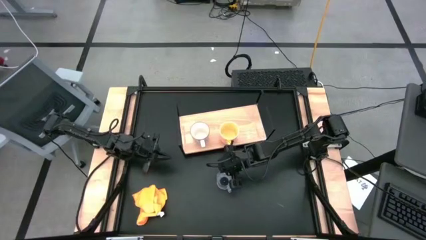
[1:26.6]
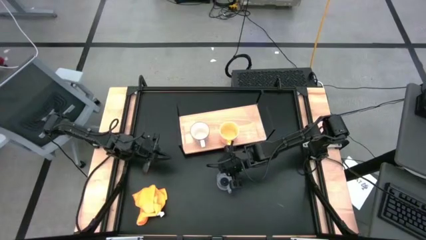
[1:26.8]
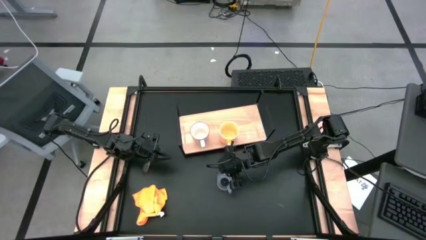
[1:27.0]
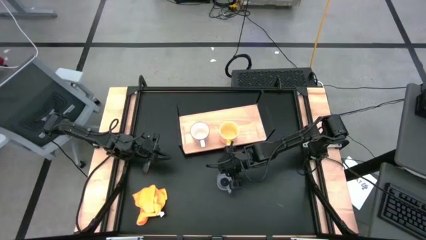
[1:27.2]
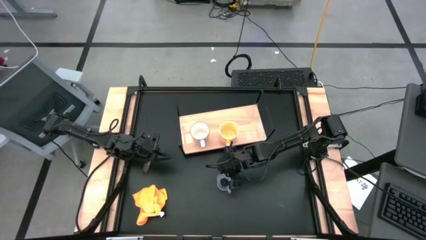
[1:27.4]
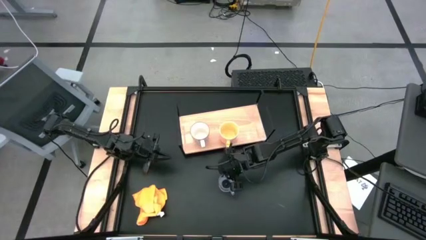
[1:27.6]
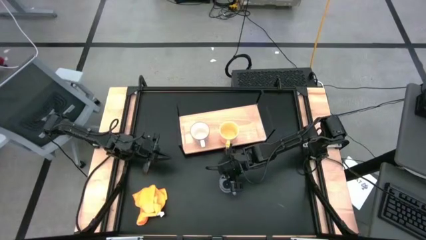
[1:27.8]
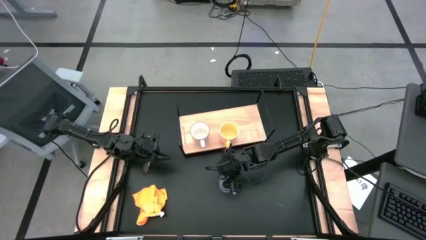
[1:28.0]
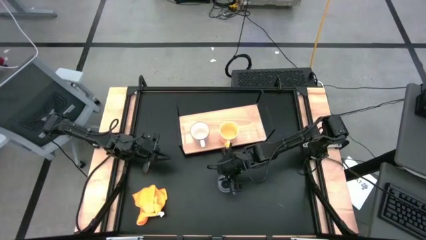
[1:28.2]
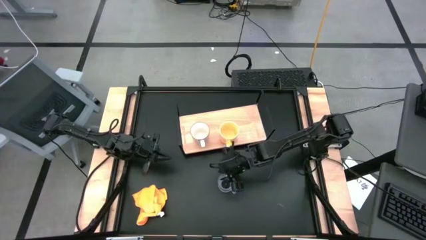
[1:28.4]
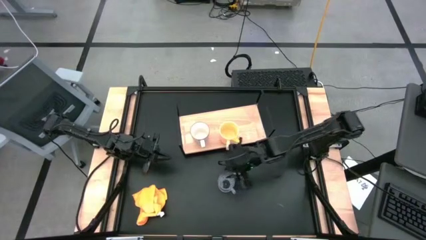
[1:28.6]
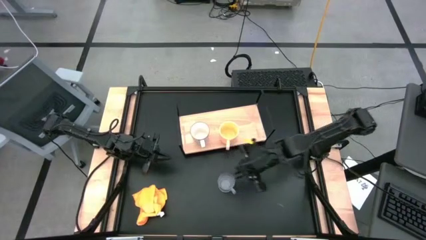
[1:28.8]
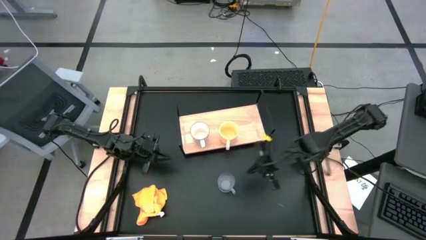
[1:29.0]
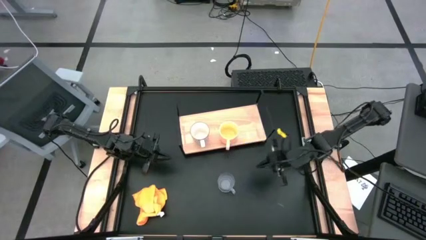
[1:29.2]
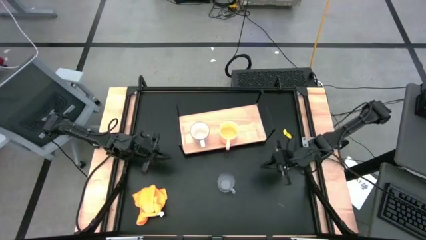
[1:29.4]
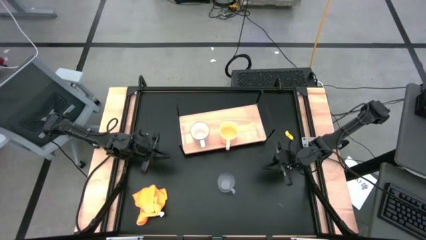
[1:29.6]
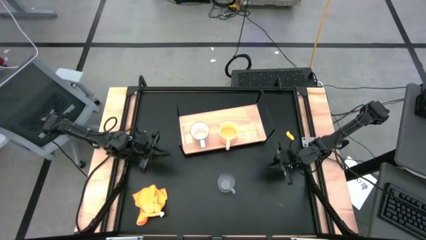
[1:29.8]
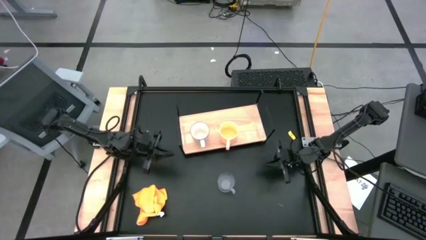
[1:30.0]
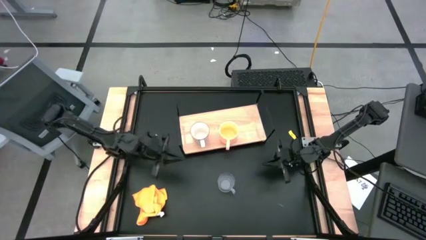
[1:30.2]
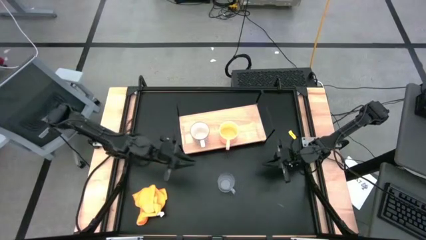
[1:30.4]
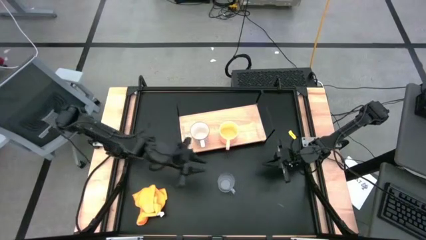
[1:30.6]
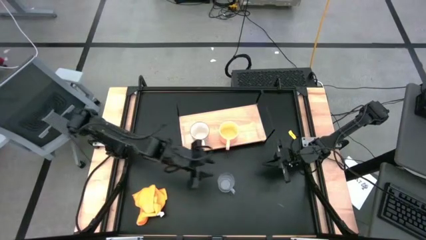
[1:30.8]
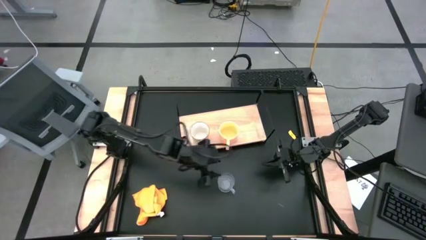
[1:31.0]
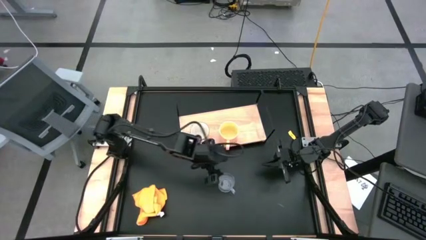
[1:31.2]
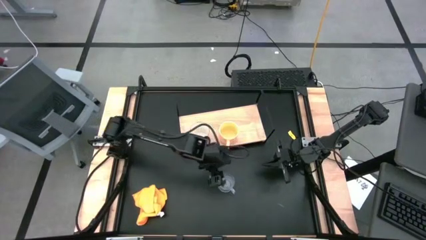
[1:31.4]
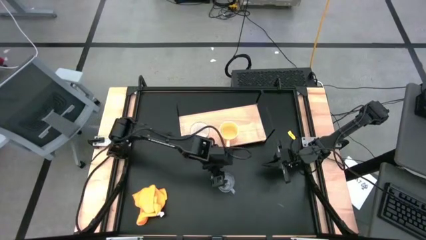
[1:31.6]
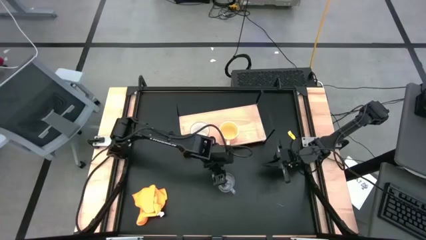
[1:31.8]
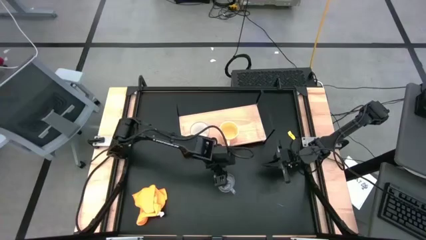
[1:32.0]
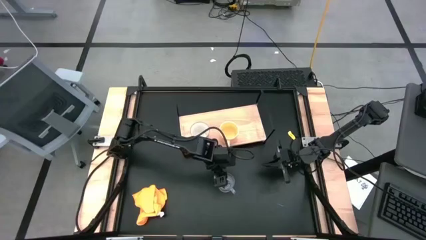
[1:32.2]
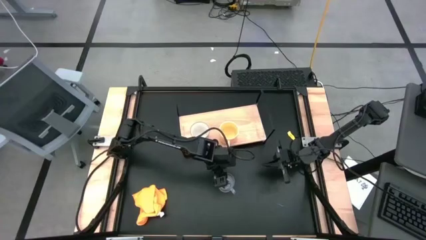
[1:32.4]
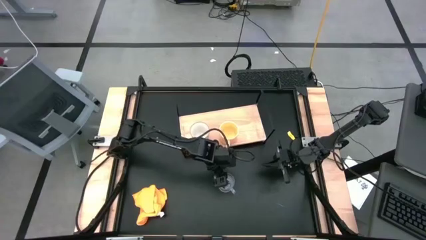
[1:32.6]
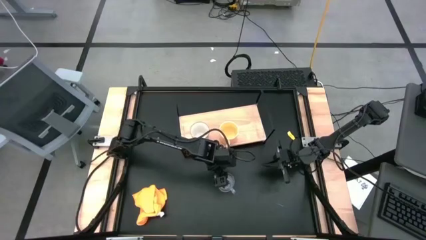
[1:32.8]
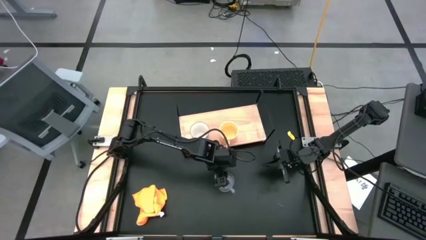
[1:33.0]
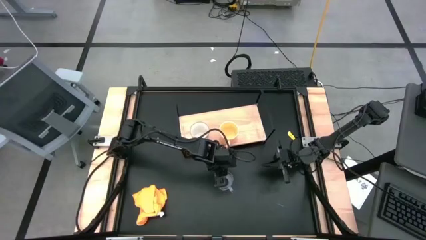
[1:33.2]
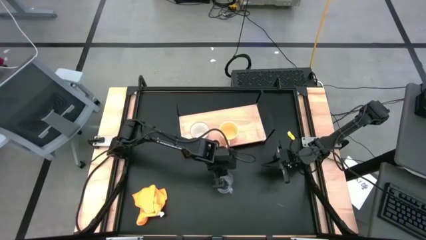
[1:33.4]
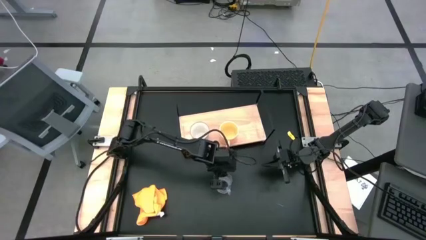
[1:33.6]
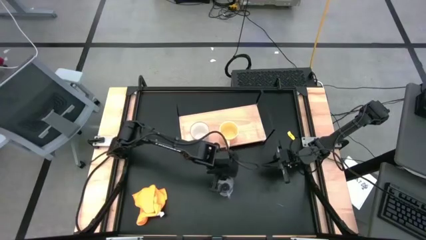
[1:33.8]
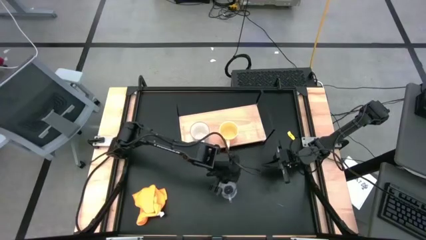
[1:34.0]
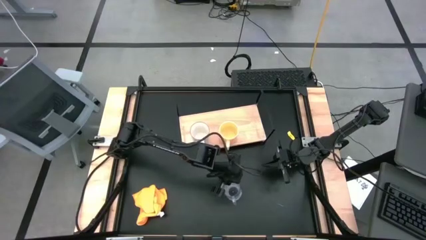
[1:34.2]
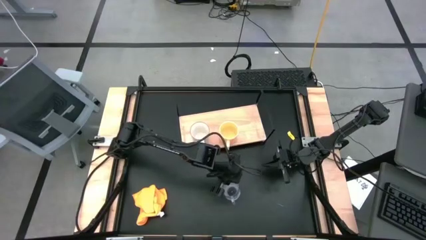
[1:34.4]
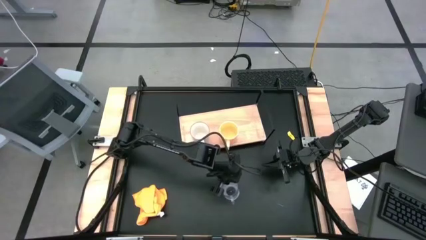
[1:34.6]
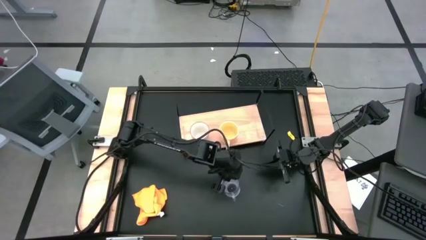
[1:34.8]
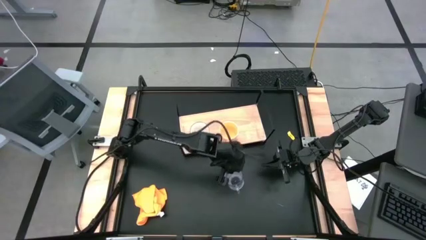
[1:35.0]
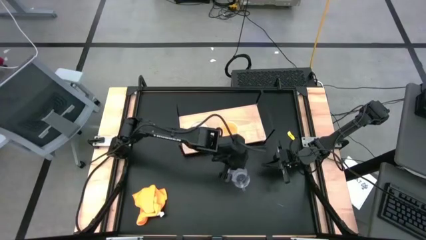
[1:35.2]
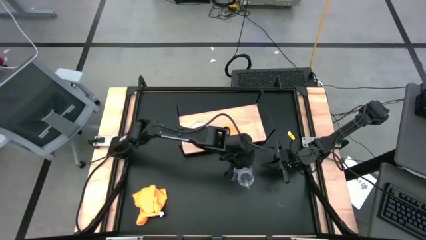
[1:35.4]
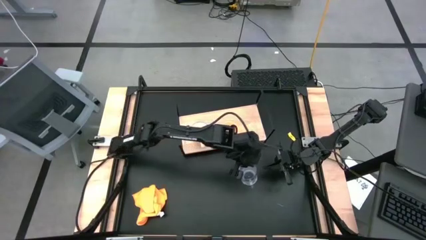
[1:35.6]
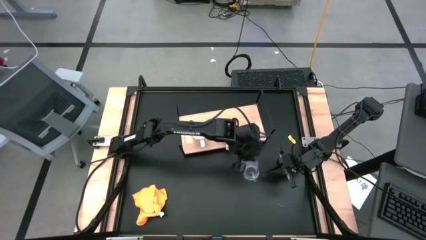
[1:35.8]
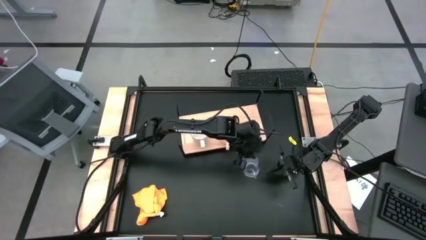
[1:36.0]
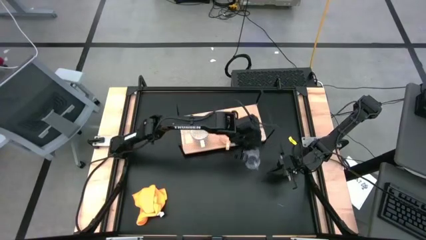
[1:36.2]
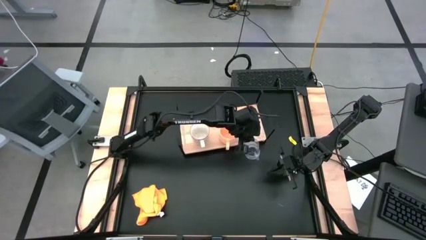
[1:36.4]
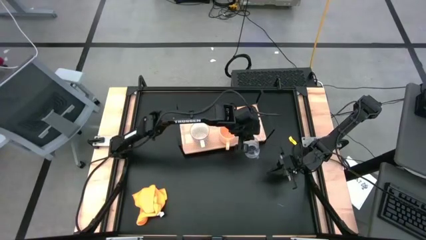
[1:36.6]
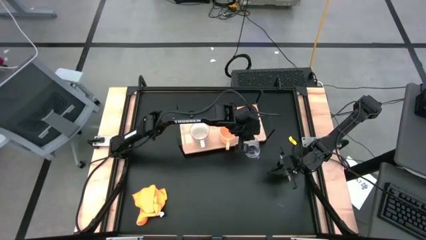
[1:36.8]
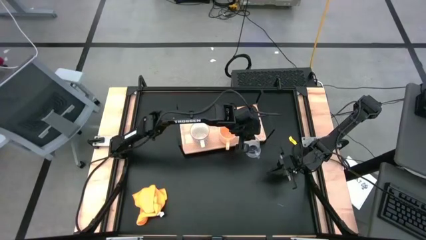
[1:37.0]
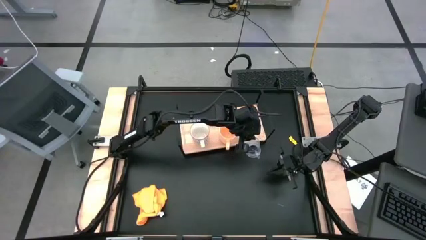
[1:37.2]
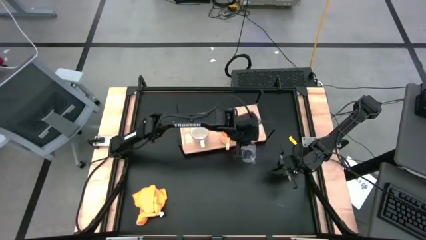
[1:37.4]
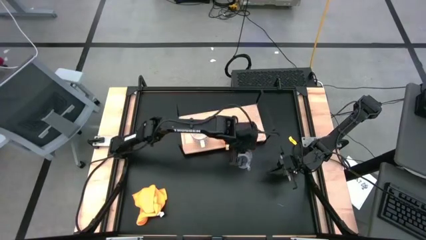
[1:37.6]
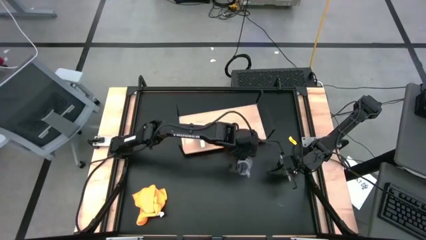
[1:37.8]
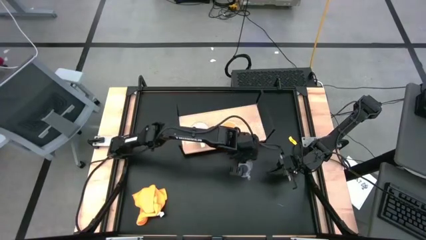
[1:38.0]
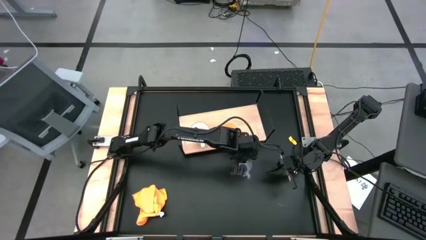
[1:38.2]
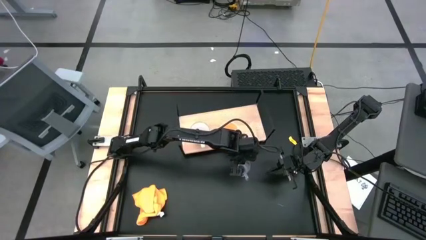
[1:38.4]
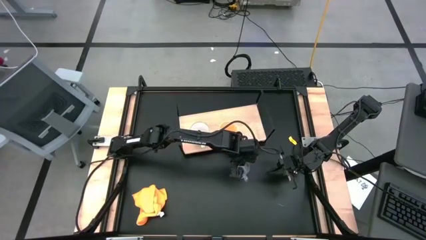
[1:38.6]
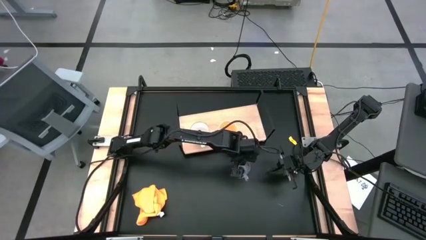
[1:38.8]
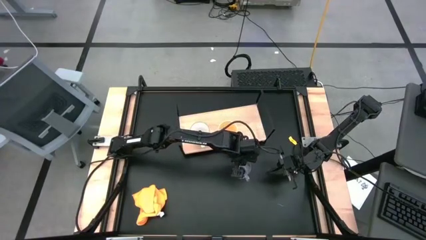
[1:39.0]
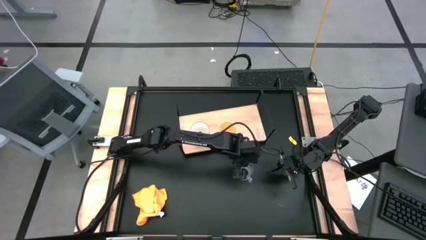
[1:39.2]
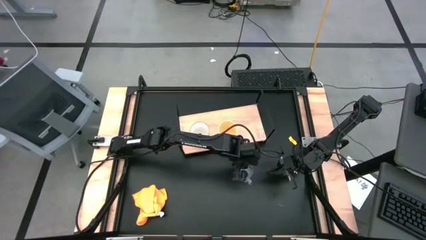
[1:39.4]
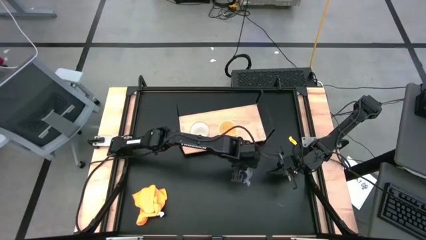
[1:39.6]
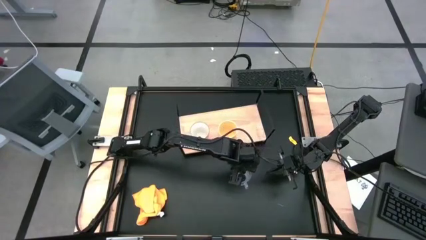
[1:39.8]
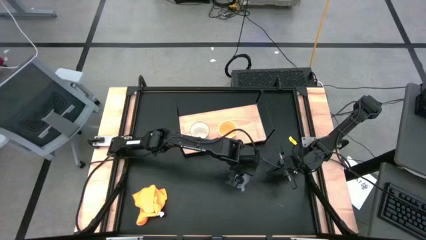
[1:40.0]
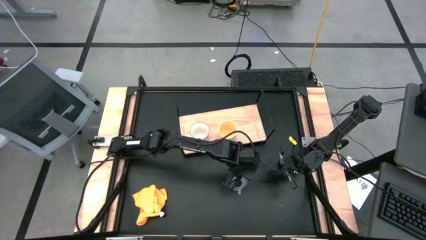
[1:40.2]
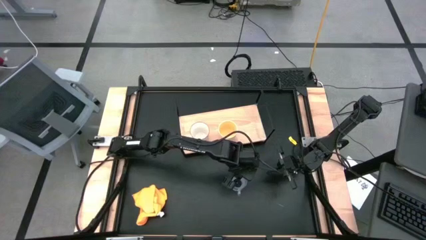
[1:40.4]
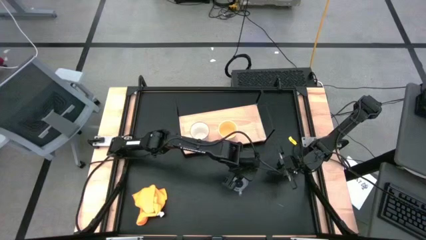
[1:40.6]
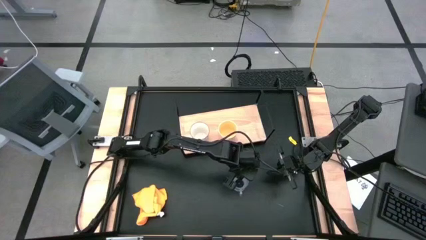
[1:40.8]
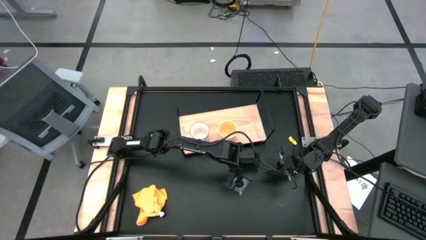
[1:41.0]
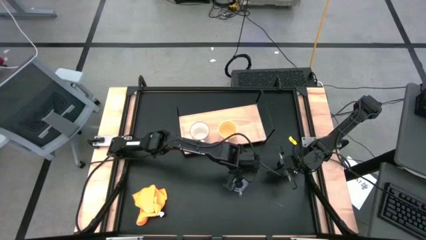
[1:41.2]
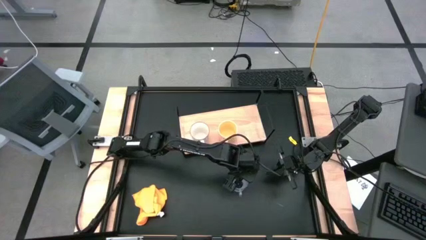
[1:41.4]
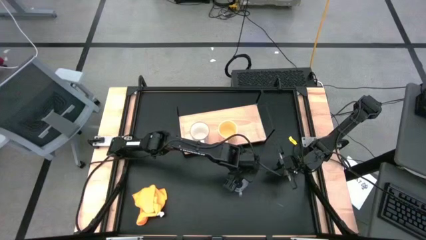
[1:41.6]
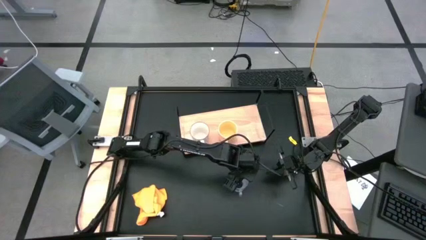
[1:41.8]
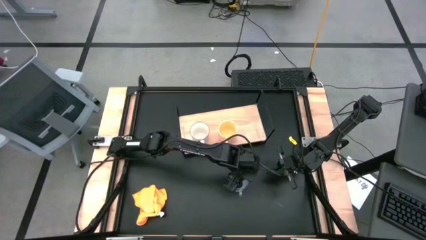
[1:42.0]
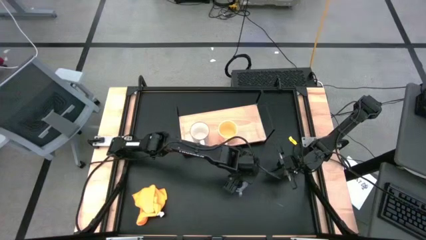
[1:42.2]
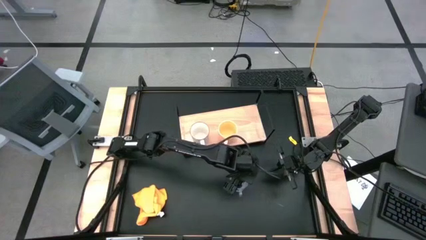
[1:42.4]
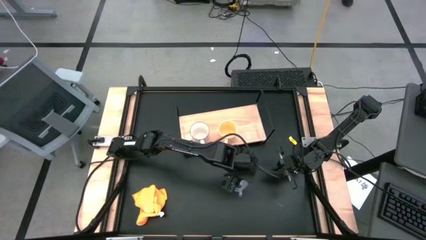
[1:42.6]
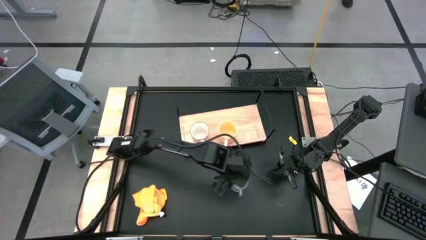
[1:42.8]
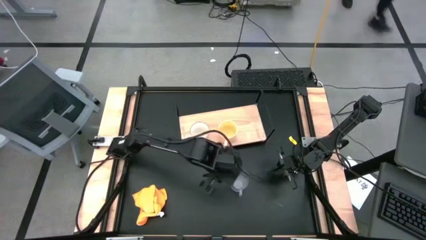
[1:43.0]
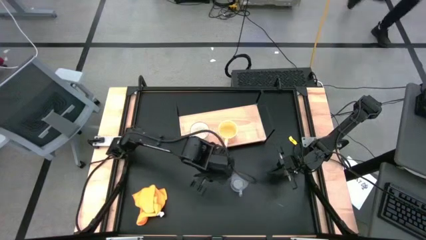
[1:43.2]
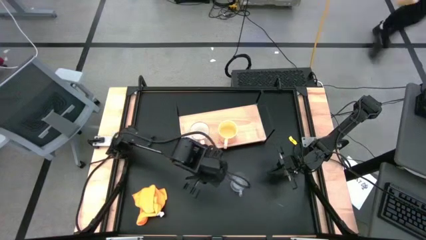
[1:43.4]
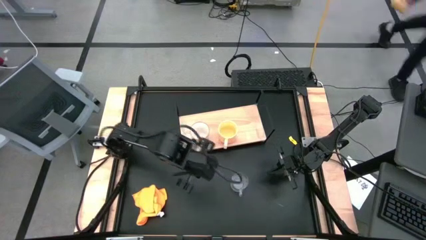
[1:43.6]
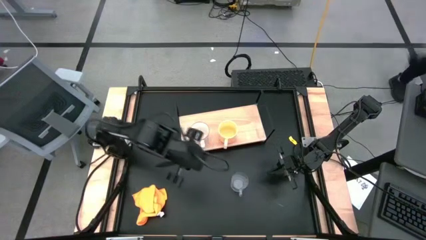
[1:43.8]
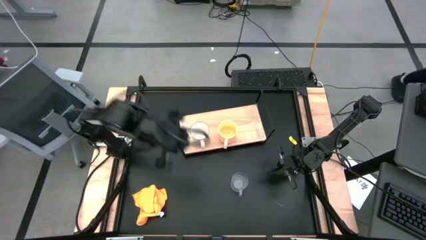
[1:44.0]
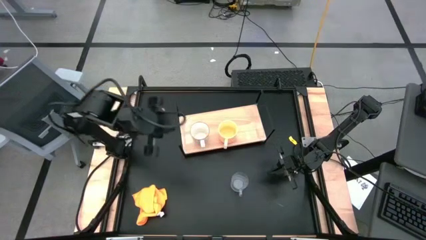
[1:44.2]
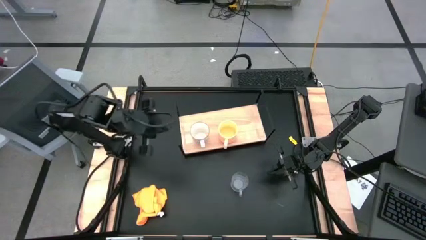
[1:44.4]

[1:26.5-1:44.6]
Task: Stack small to large cups/mugs on shelf
Put the transparent mug on the shelf
